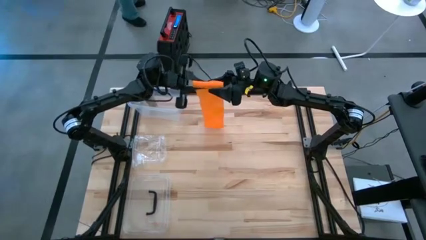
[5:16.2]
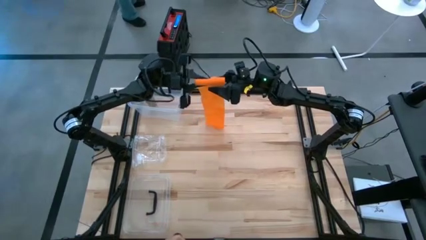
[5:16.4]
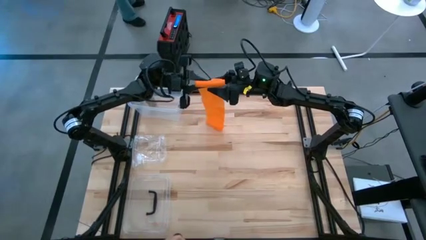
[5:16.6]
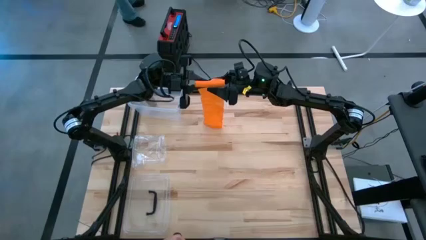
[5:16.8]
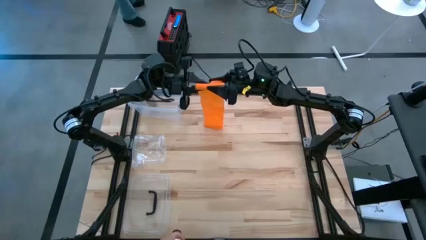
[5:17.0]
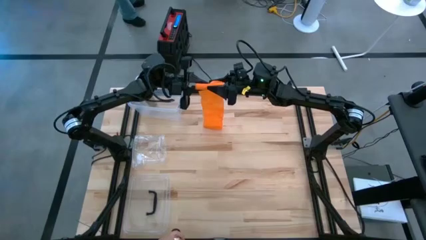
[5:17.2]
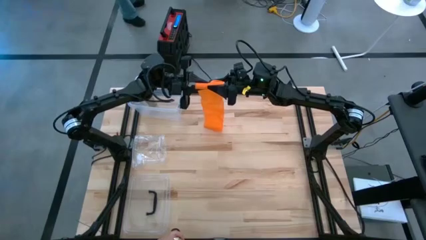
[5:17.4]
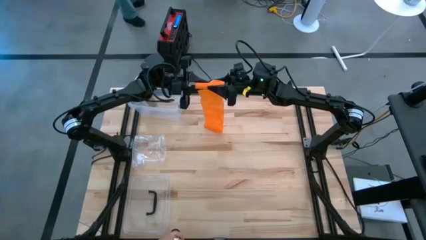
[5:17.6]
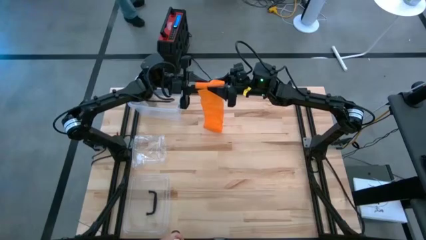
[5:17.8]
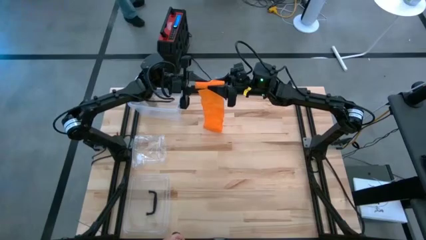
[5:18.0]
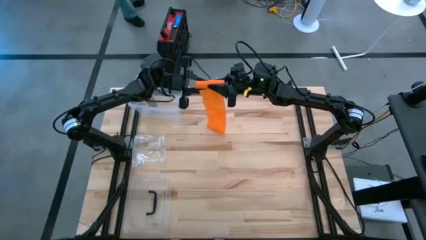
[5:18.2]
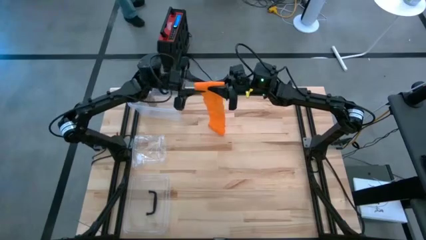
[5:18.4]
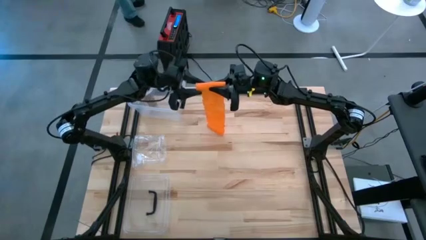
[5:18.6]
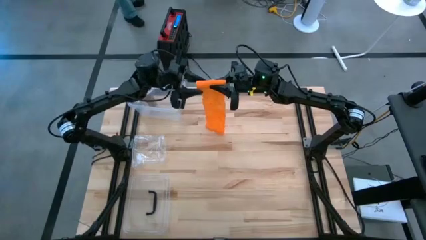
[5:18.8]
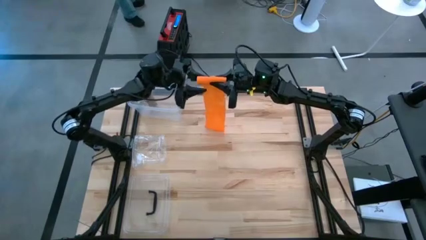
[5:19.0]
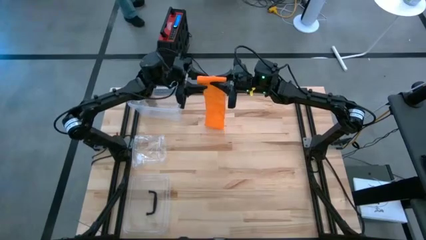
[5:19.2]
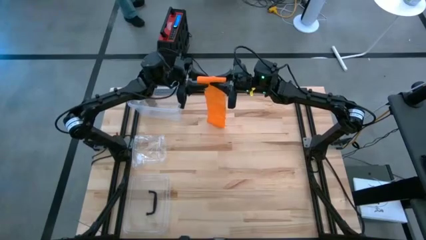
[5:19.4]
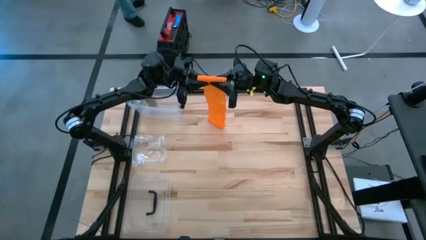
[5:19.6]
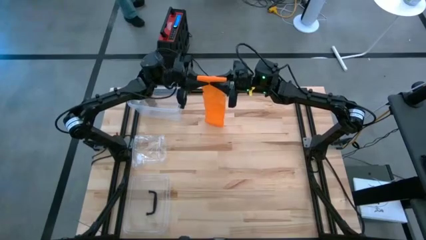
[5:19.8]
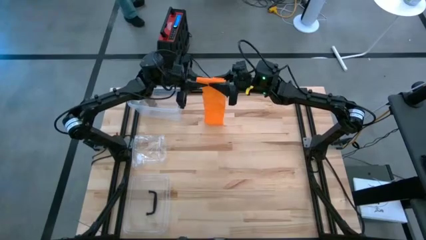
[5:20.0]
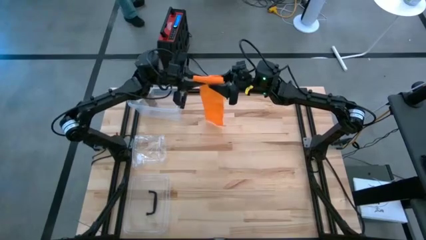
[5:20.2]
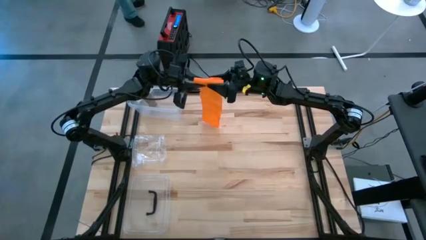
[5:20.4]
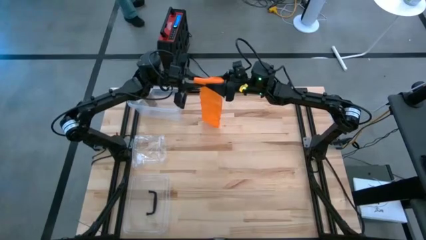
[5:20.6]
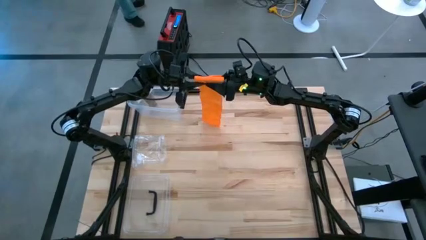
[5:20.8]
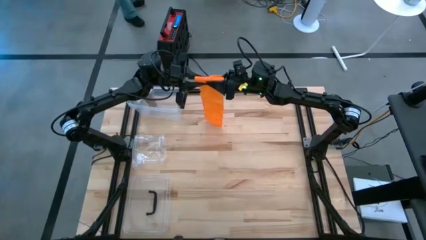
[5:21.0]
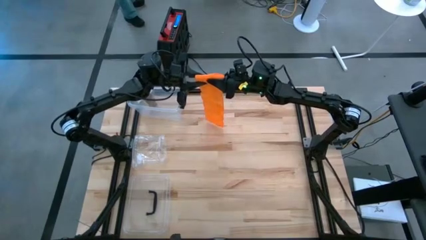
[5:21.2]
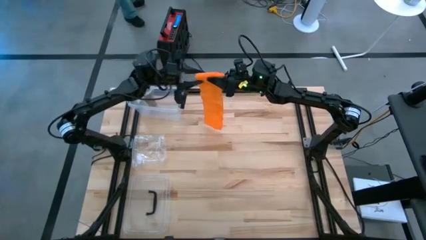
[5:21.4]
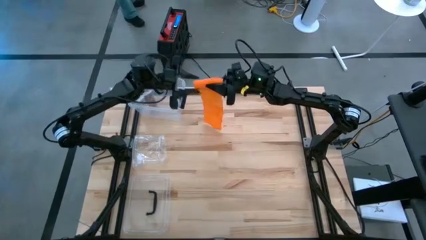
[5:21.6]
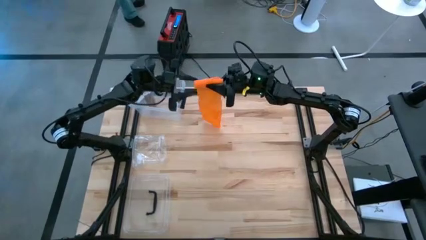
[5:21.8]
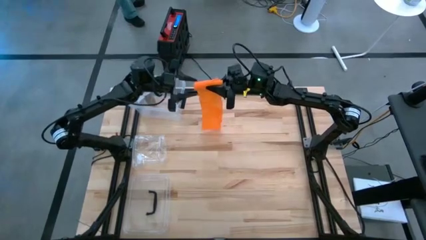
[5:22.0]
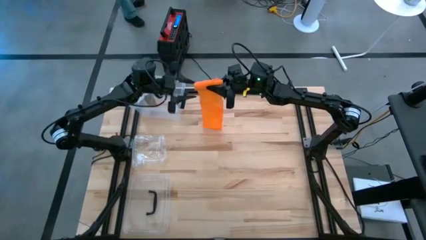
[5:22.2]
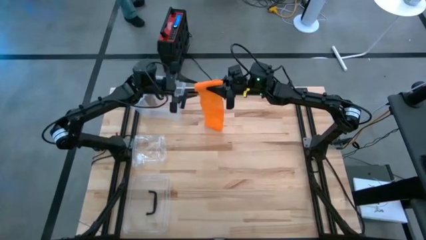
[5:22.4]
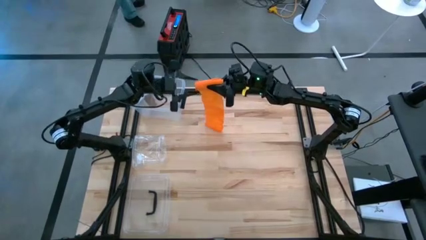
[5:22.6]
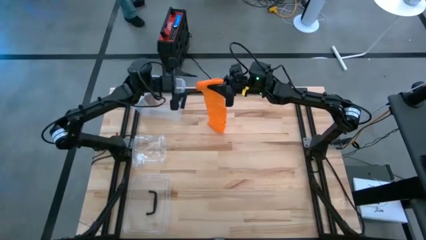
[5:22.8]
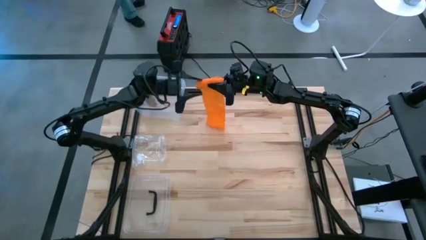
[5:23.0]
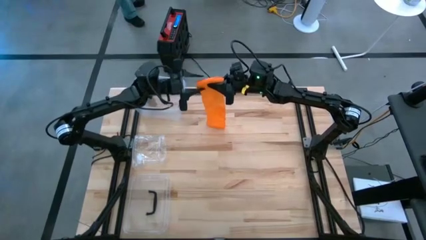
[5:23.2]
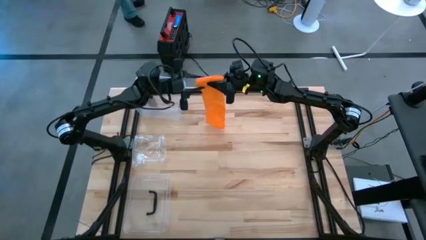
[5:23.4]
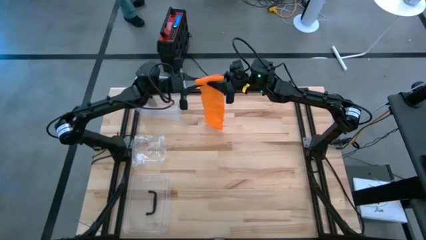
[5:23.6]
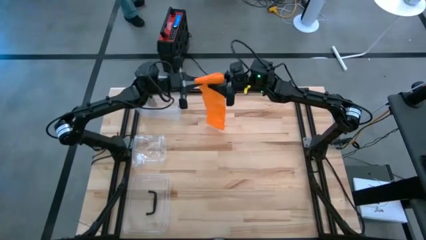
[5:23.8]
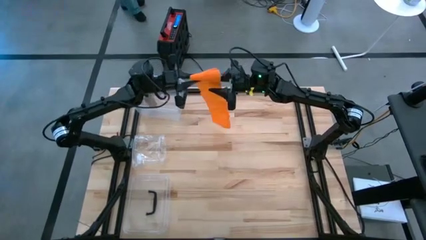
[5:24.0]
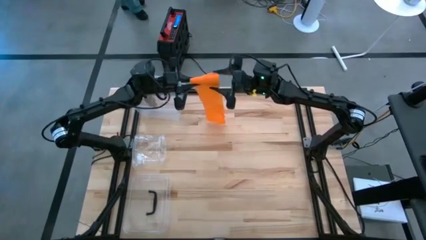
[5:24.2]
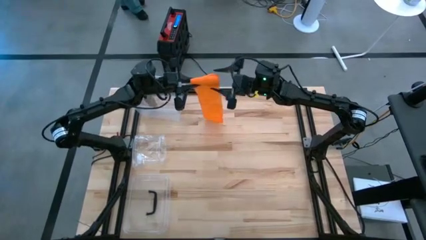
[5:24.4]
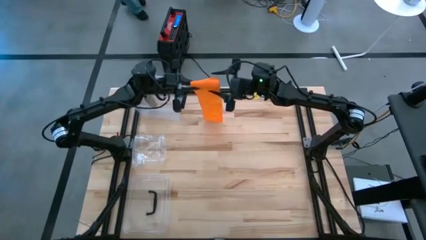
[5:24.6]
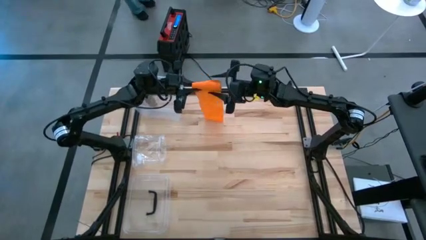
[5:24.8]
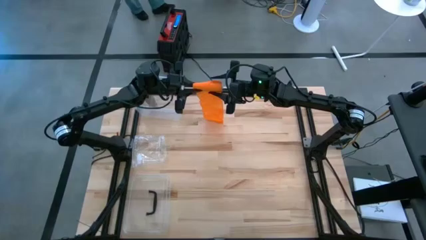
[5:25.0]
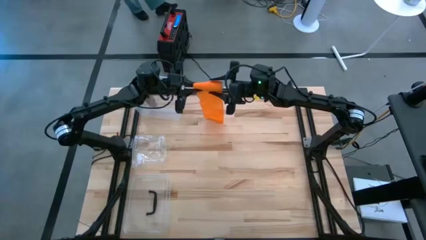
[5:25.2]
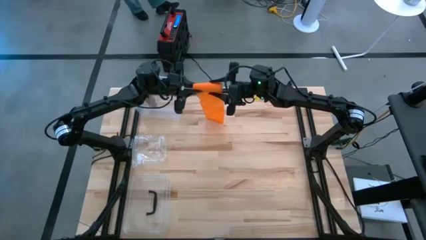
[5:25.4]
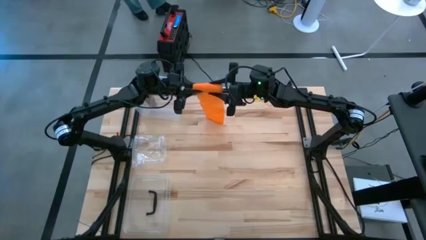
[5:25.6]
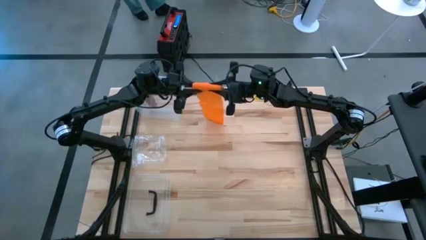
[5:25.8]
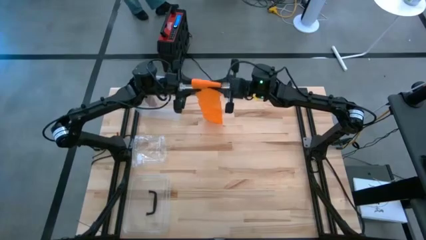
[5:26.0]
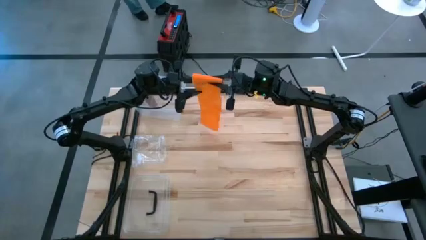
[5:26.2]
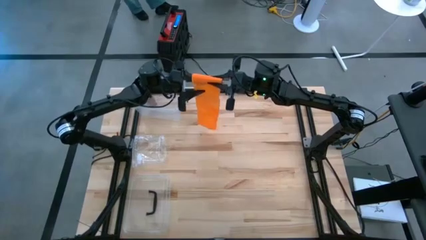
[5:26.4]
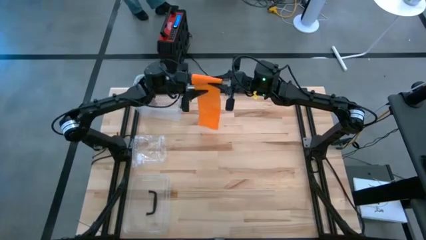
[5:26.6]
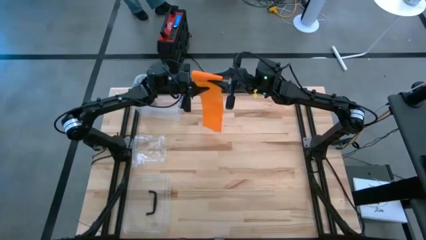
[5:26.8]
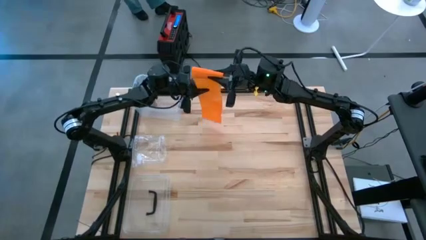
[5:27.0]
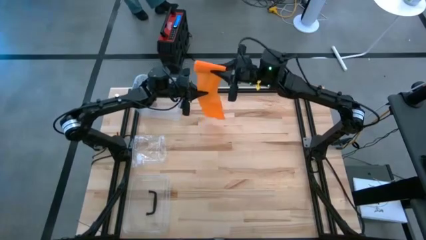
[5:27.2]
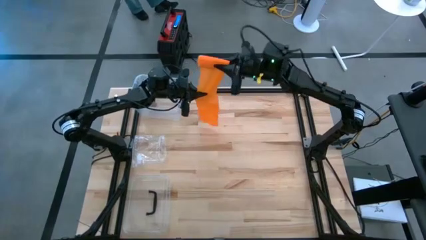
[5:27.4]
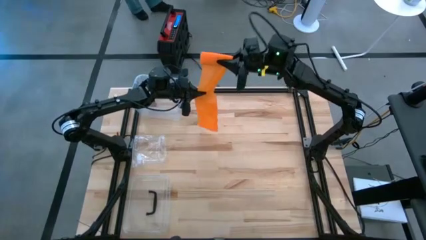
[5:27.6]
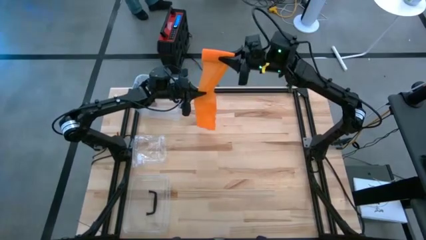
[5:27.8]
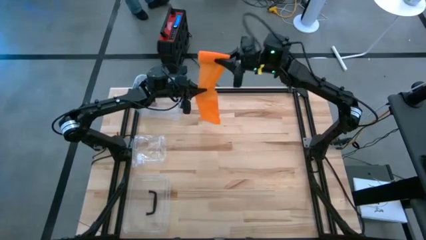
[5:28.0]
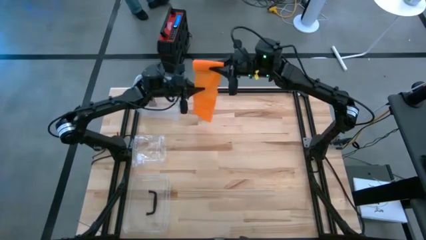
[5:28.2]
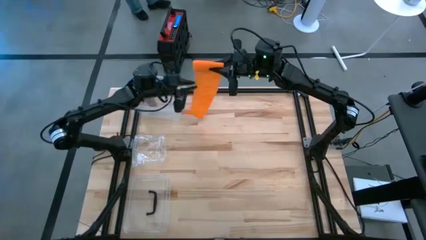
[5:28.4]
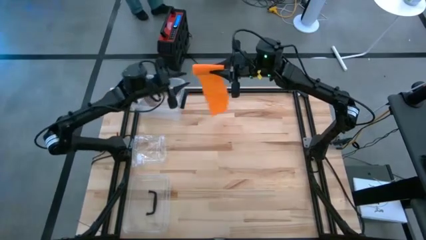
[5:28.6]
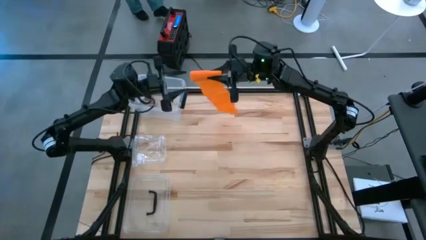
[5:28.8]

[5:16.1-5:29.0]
Task: Roll bandage
Roll the orange bandage

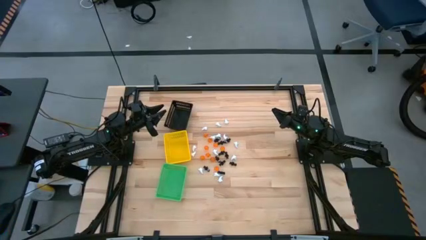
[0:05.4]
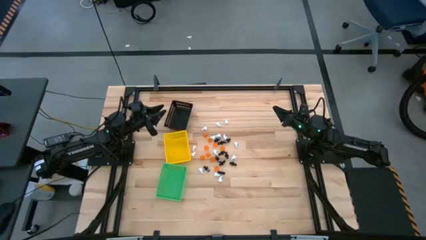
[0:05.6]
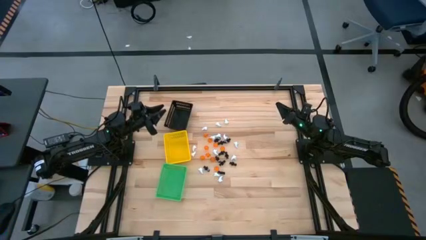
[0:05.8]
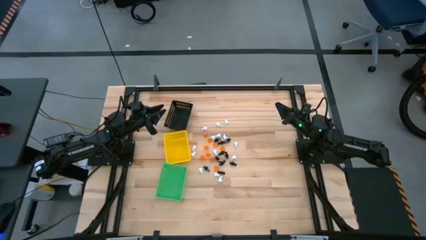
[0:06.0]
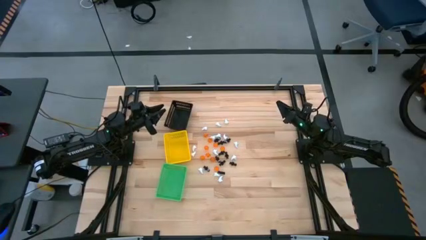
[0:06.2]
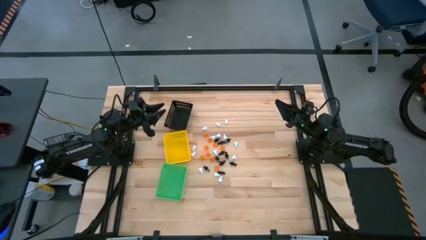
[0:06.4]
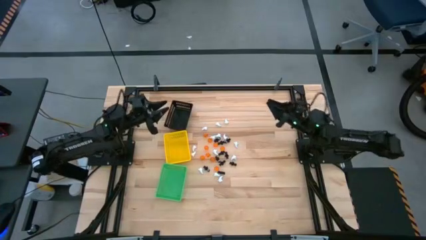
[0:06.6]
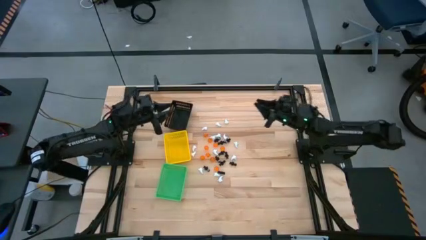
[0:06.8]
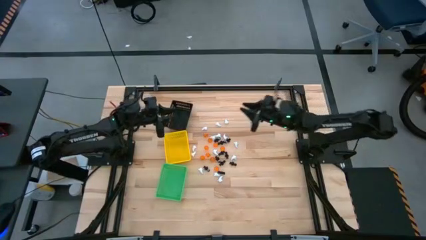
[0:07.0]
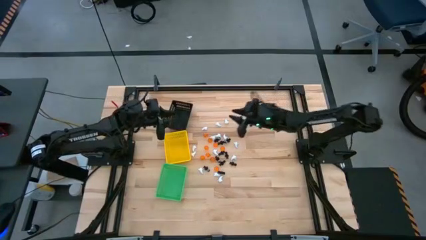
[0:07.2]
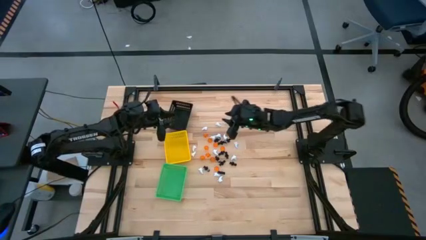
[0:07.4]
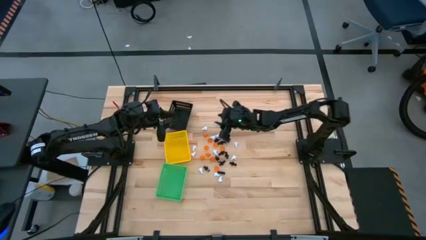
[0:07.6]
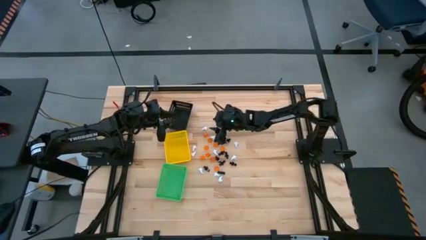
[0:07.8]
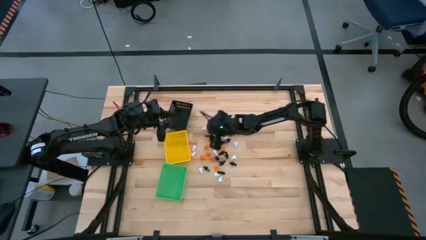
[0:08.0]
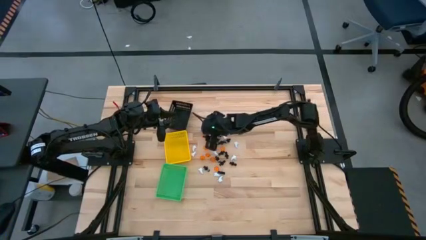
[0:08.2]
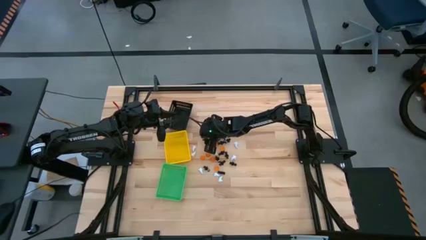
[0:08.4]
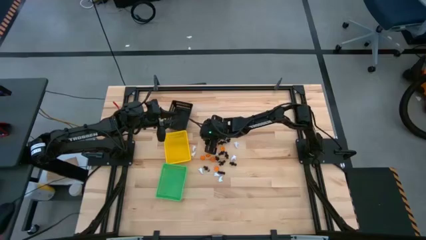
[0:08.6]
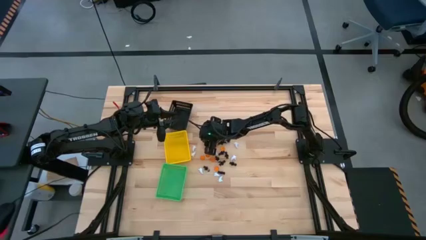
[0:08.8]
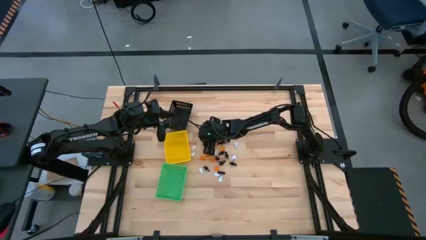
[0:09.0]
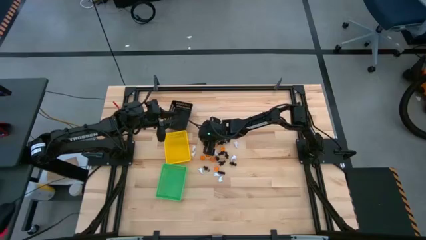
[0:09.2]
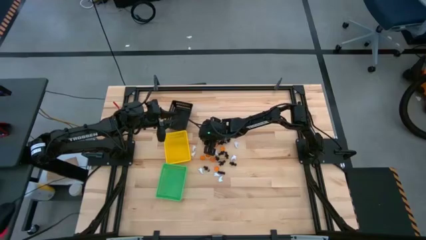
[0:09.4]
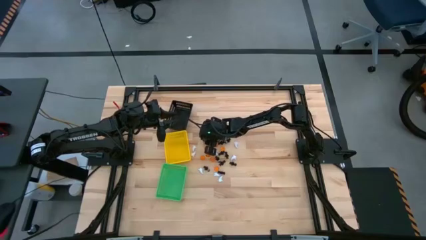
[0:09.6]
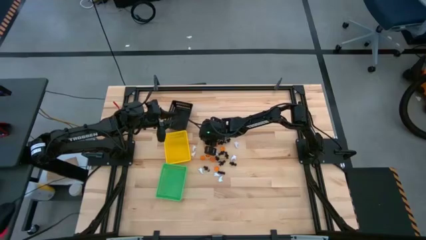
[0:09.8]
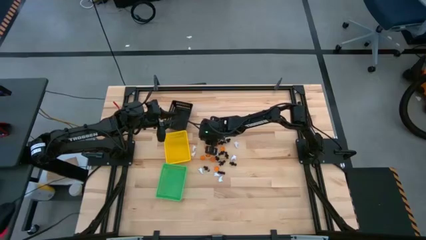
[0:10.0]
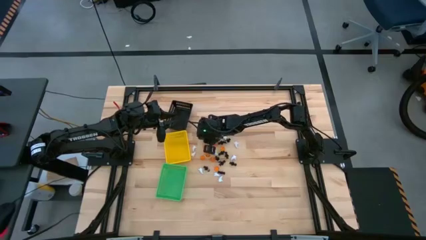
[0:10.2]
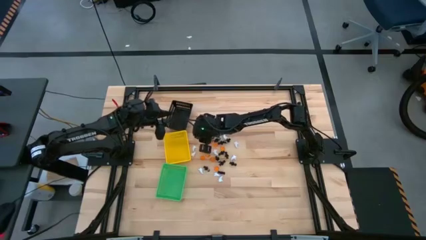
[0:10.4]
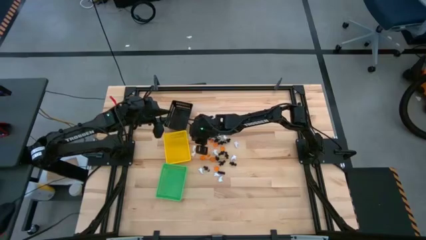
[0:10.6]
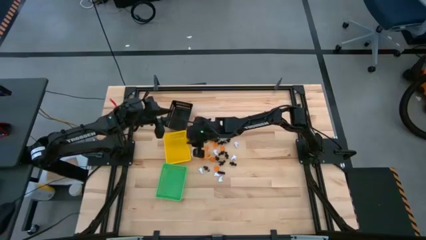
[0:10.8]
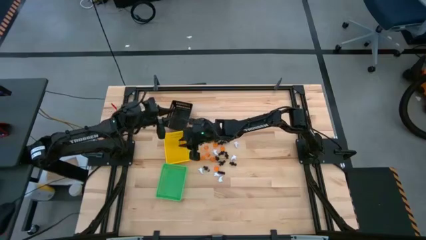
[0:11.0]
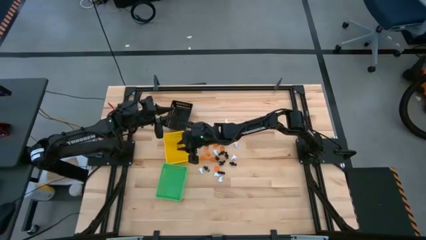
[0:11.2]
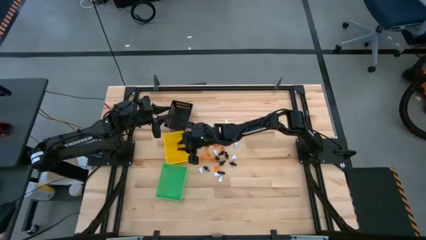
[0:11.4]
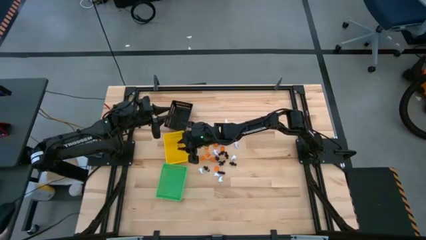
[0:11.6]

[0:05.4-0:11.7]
Task: Sort Halloween decoration
Put the orange pumpkin toy into the yellow basket
